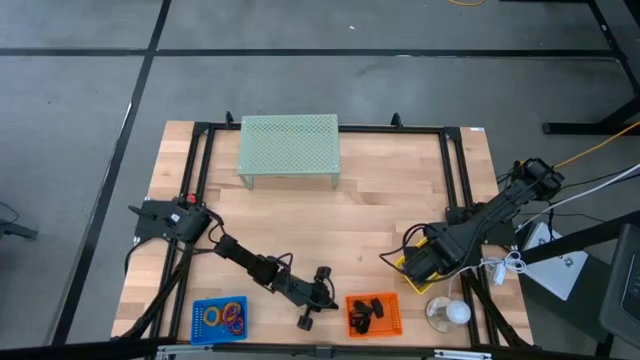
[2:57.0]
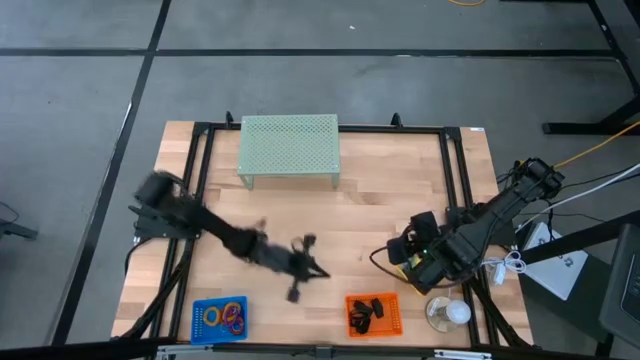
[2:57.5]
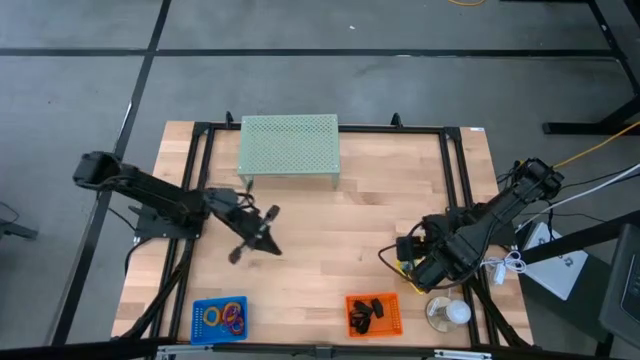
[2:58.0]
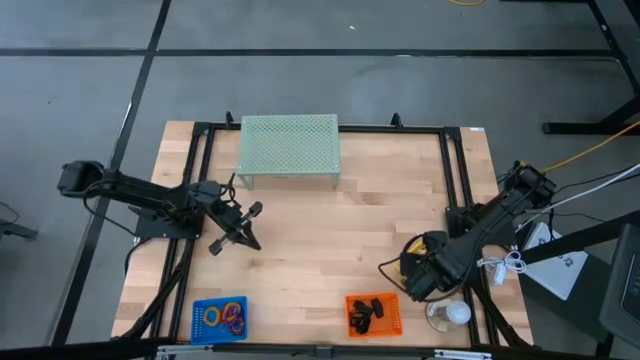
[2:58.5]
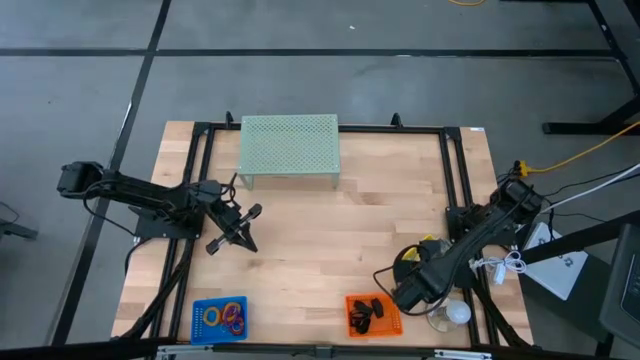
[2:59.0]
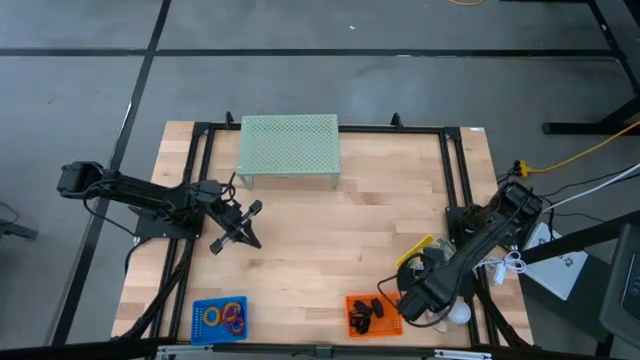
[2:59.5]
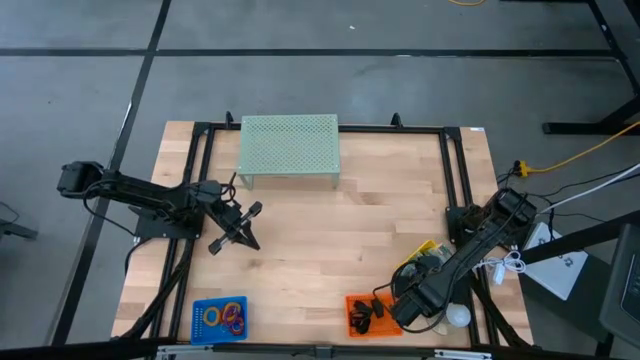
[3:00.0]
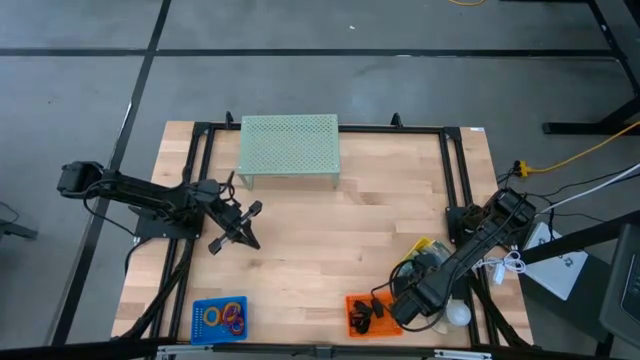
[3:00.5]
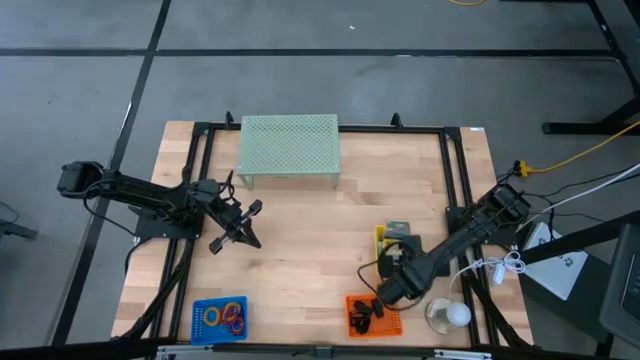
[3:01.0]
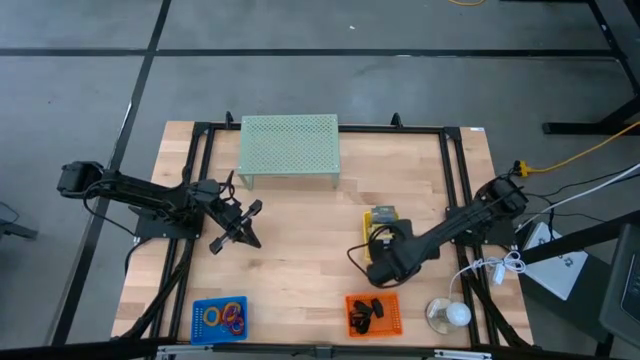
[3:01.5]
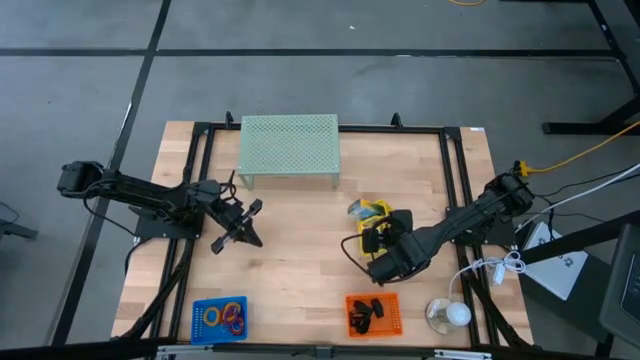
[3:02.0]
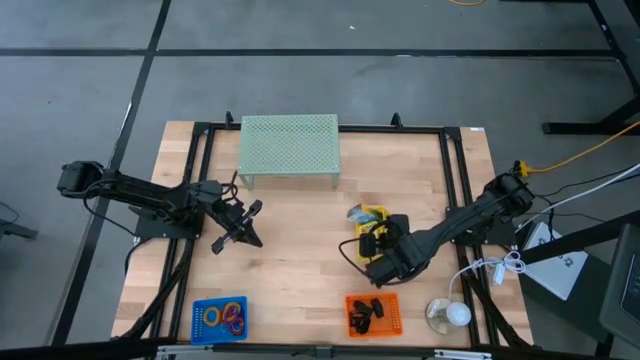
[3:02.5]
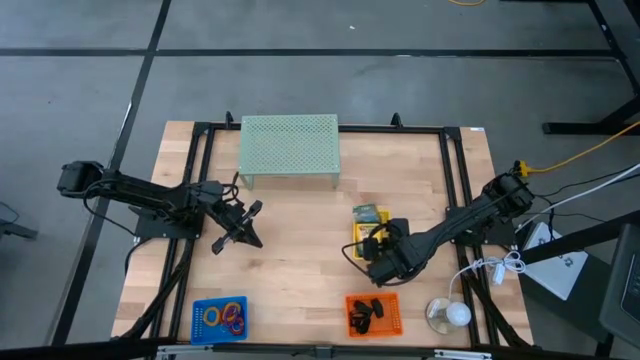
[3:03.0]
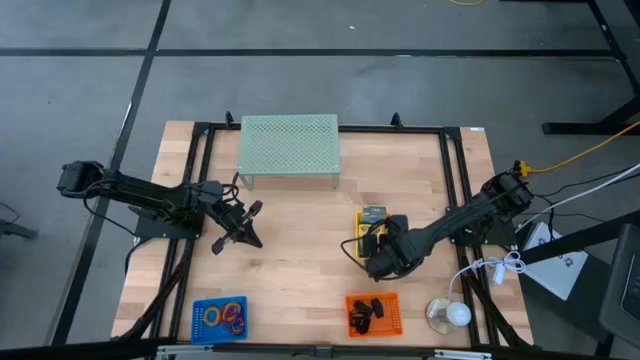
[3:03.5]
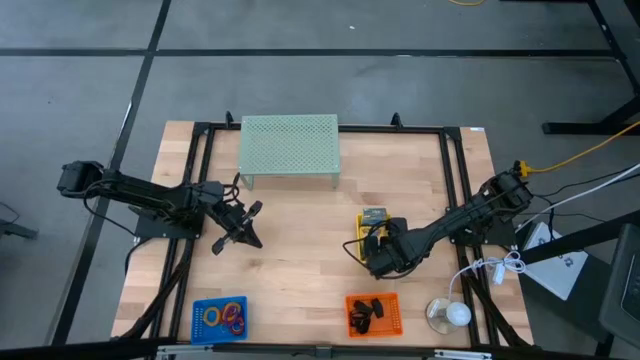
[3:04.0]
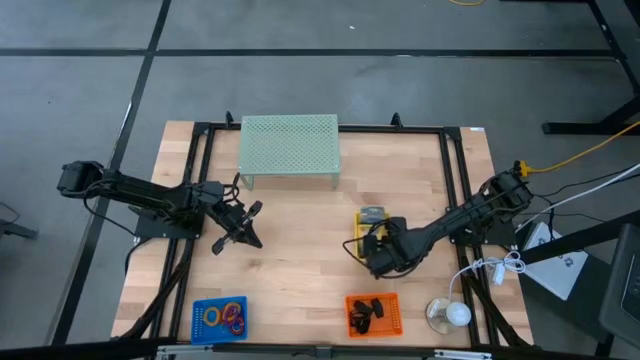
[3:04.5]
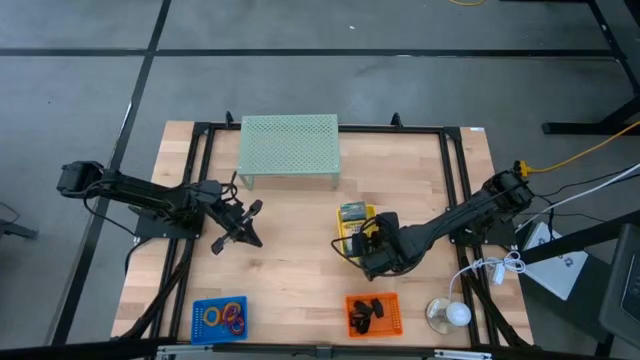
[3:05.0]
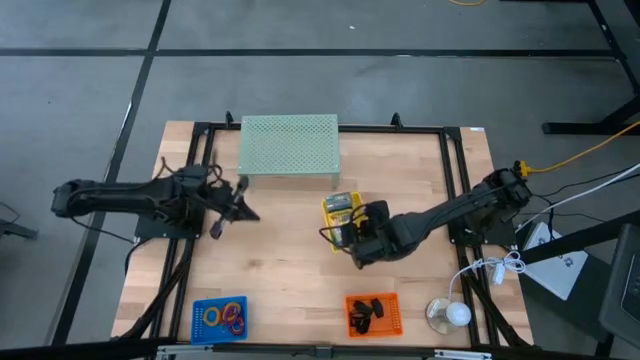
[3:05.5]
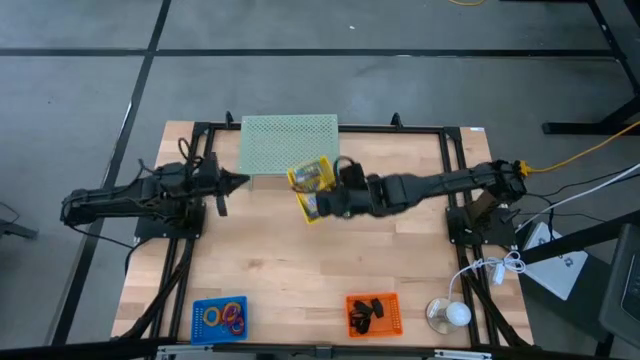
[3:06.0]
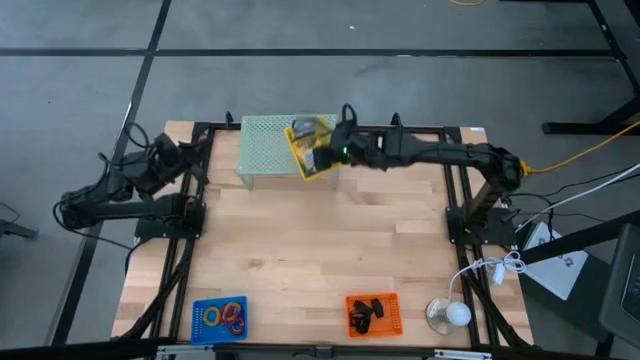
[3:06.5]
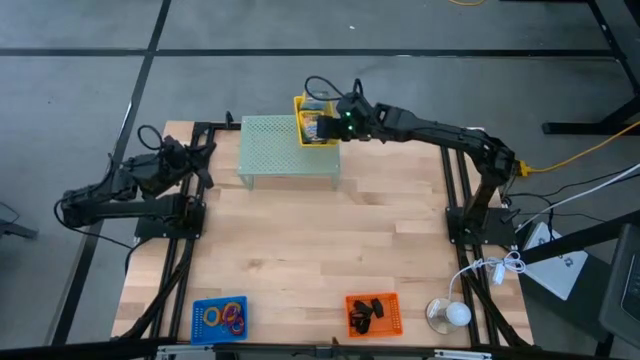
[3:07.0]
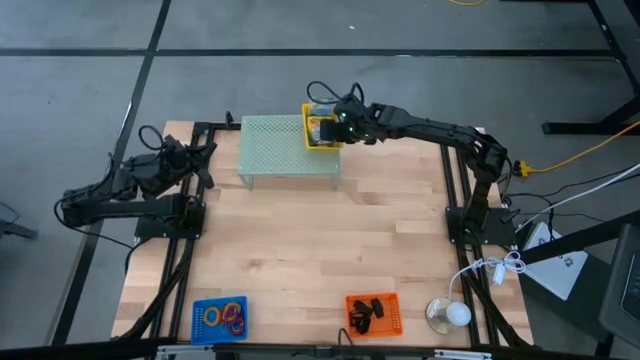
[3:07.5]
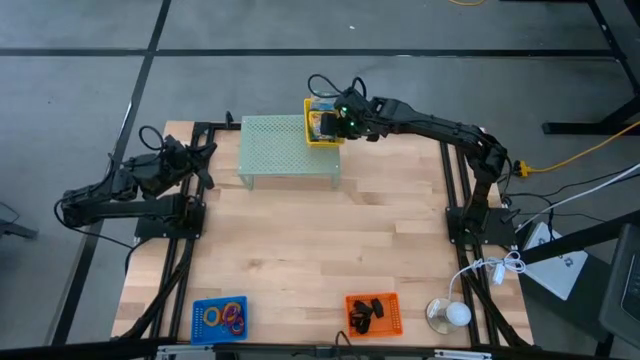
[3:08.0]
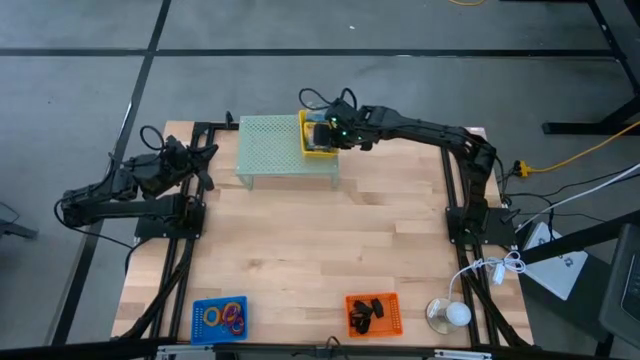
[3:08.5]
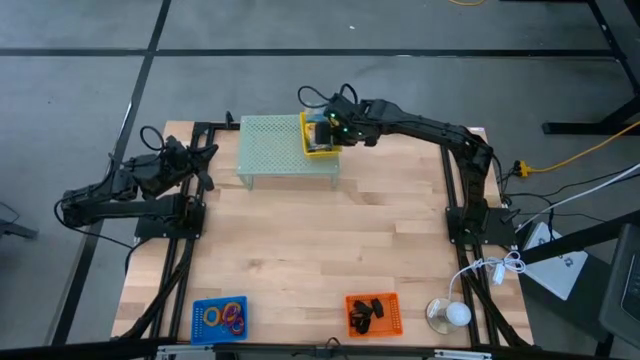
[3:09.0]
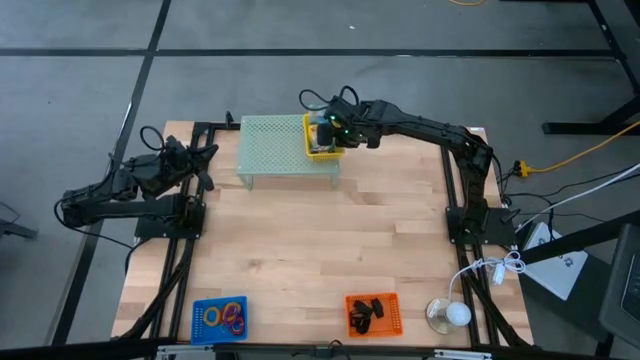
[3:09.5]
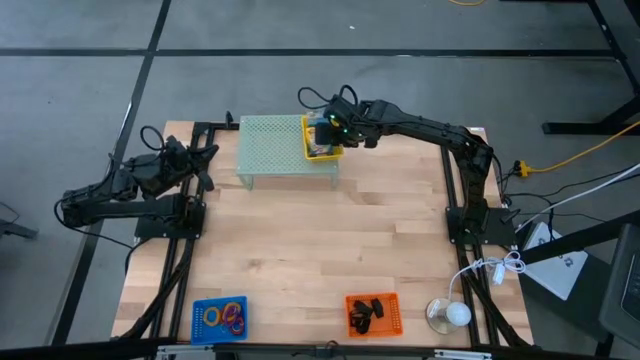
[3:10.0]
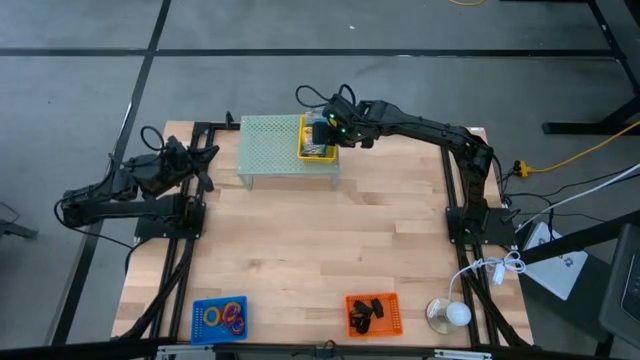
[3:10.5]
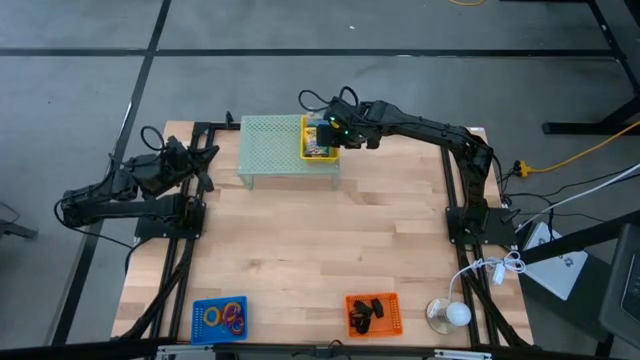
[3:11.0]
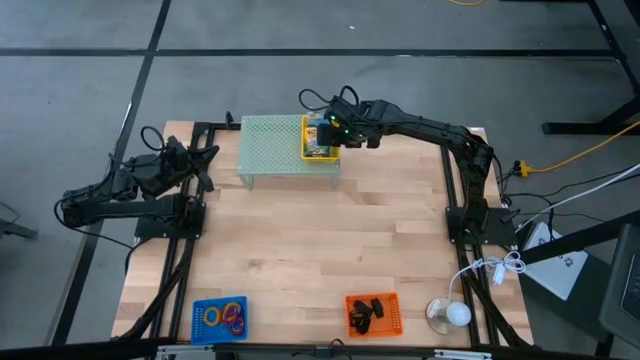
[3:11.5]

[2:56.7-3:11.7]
Task: Pick & Place Office Desk Supplies
Put the yellow bin on the shelf

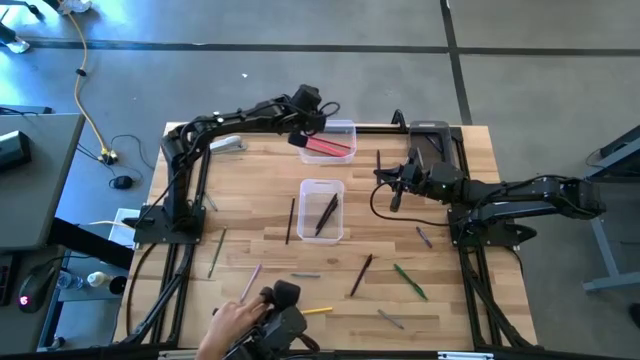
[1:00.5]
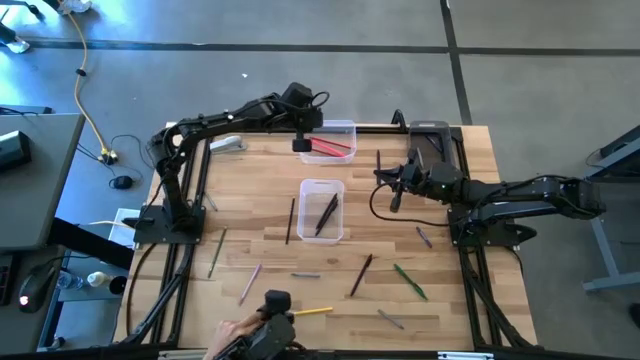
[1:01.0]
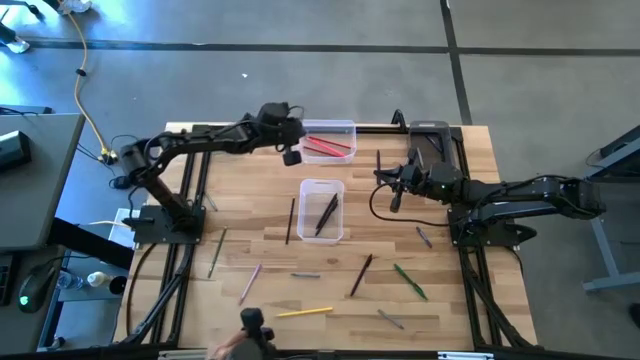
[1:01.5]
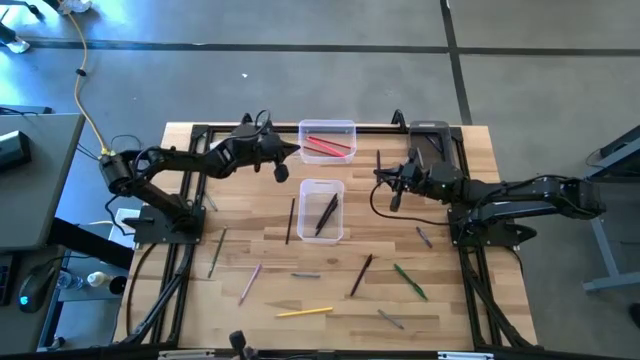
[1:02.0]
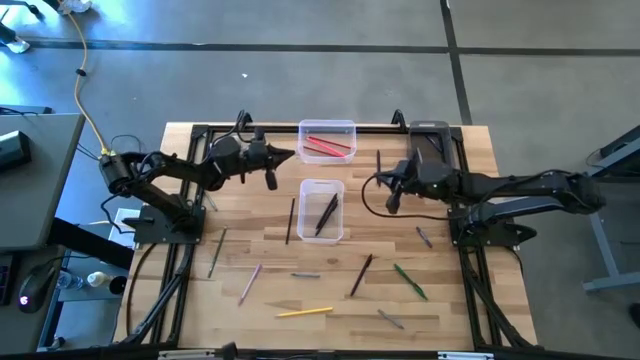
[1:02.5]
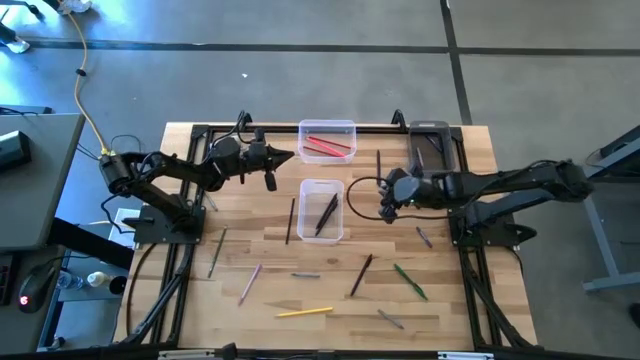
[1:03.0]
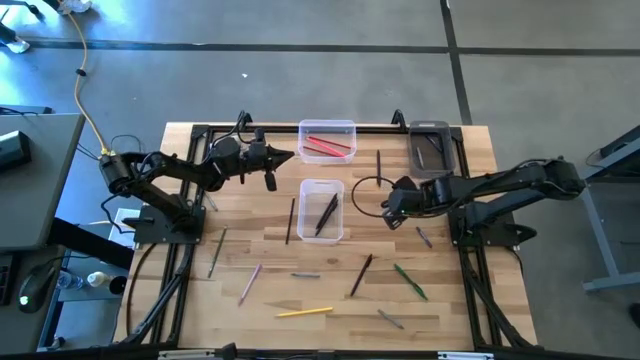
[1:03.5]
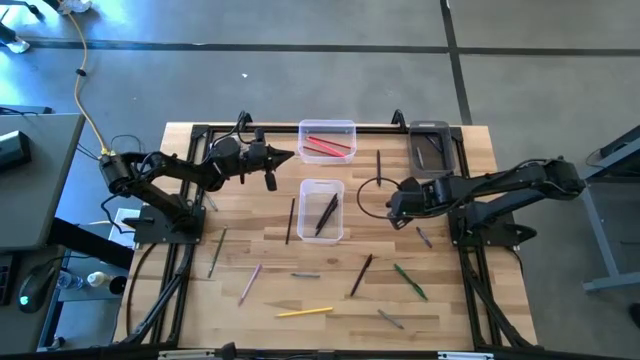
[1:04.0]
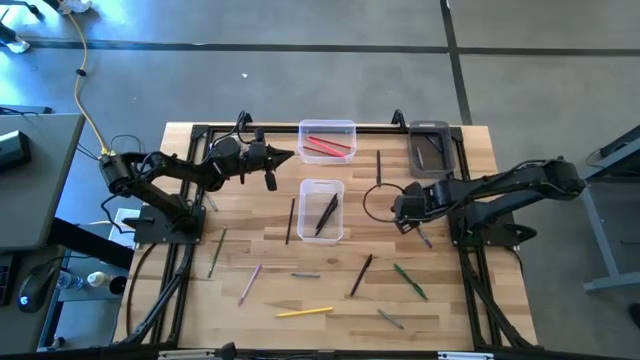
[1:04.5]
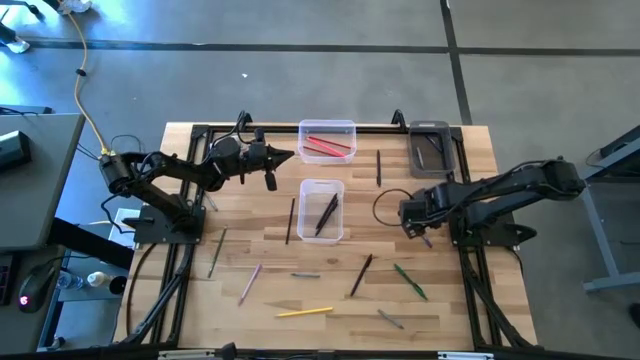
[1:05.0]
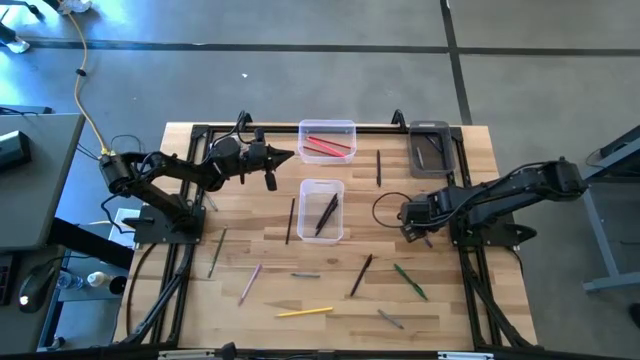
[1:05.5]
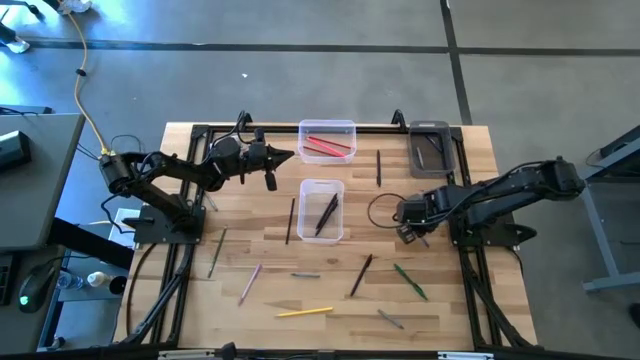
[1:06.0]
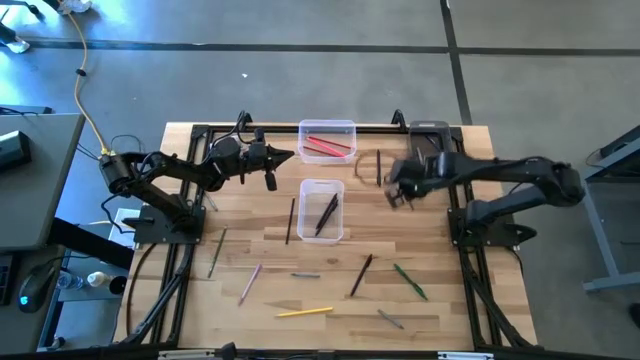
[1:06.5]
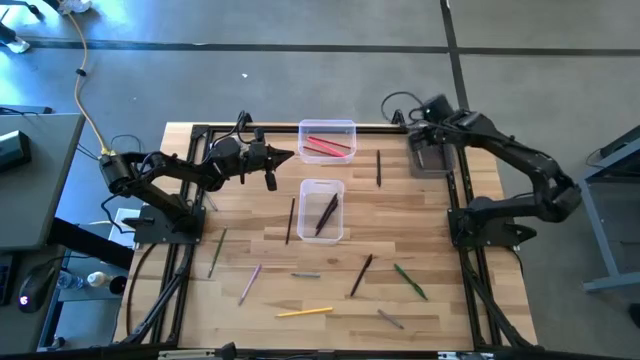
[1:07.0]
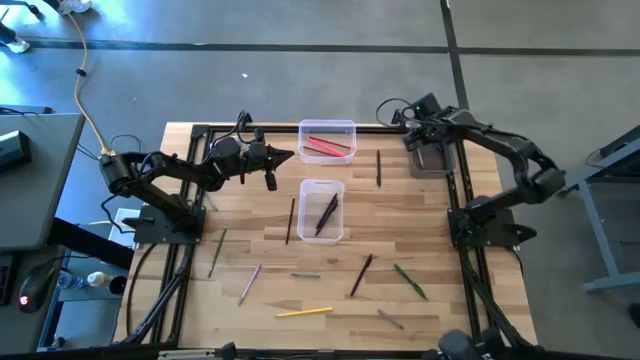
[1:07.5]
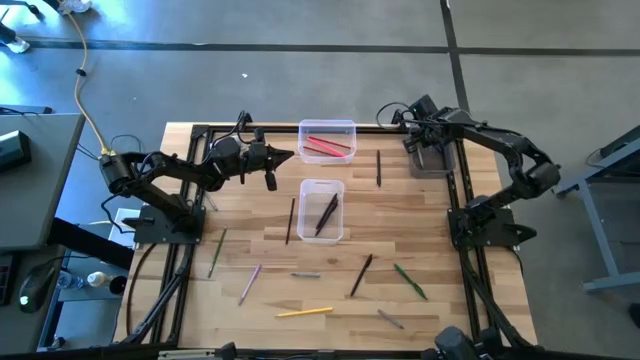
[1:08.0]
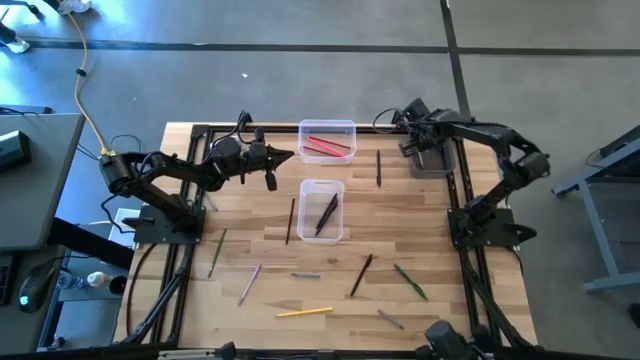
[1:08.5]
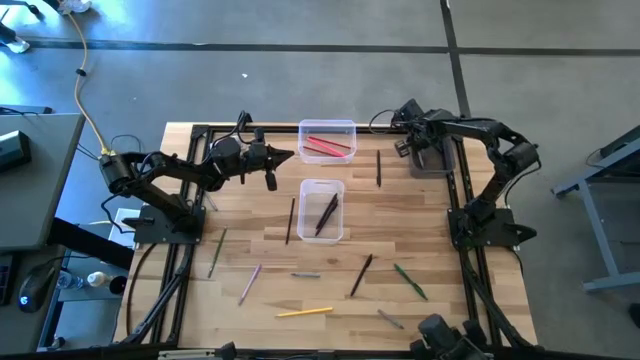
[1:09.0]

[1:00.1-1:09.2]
Task: Sort crayons/erasers/pens/pencils in bins
Put the blue crayon into the transparent black bin
